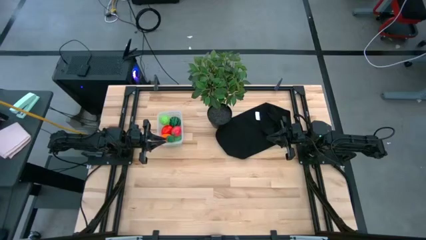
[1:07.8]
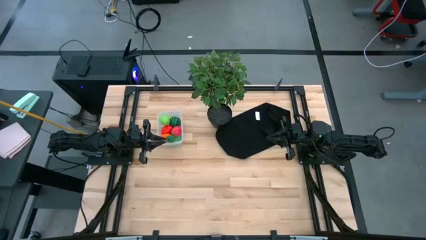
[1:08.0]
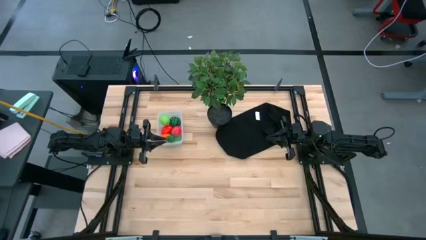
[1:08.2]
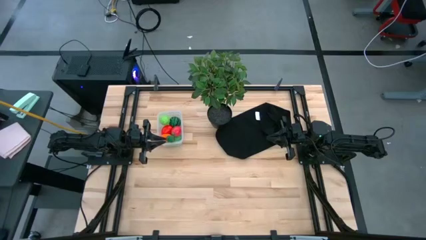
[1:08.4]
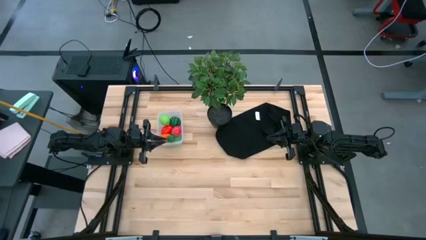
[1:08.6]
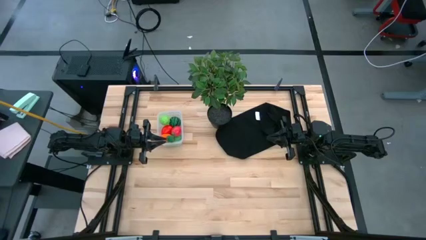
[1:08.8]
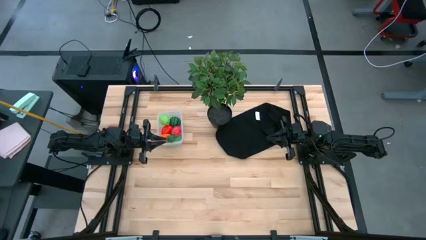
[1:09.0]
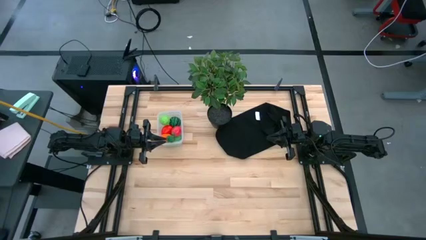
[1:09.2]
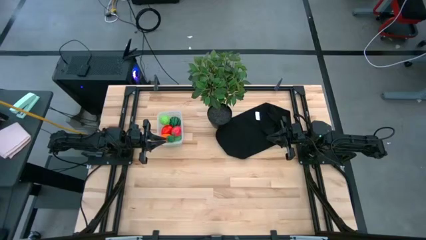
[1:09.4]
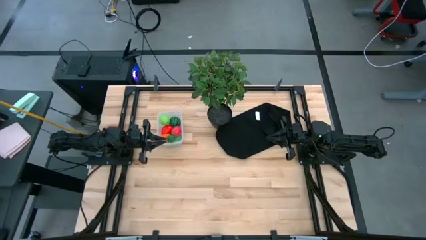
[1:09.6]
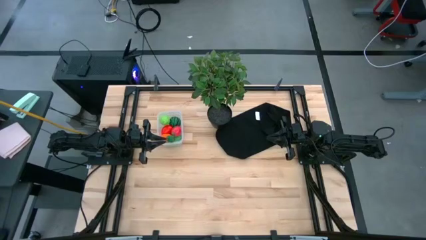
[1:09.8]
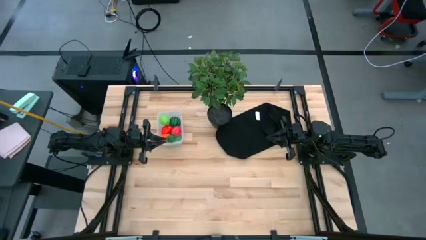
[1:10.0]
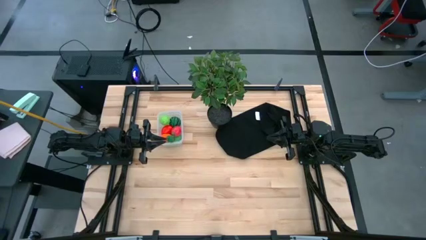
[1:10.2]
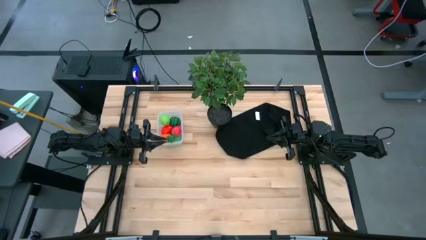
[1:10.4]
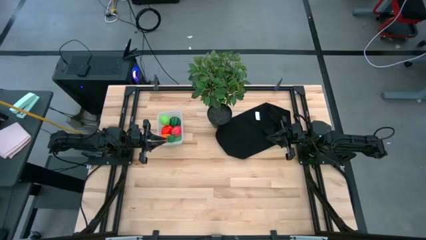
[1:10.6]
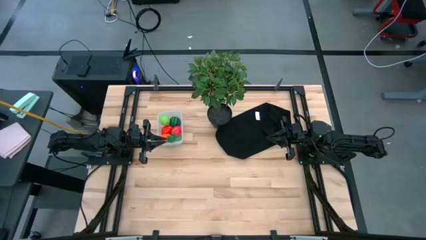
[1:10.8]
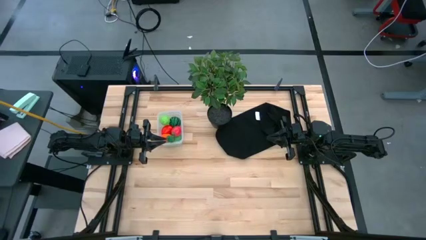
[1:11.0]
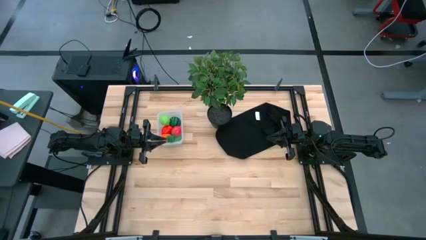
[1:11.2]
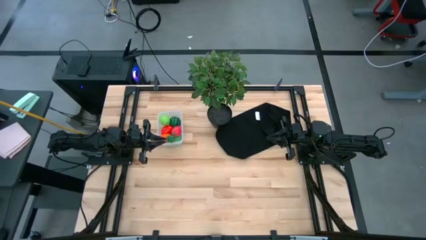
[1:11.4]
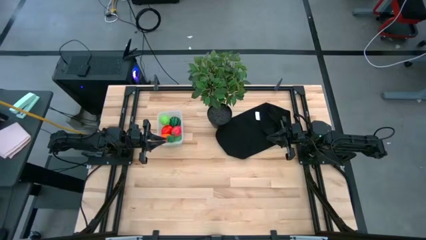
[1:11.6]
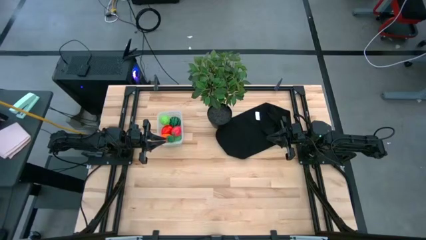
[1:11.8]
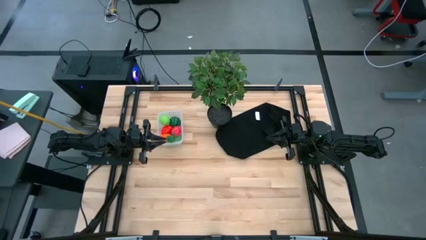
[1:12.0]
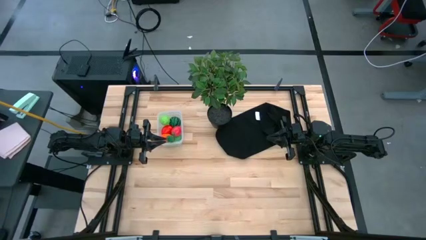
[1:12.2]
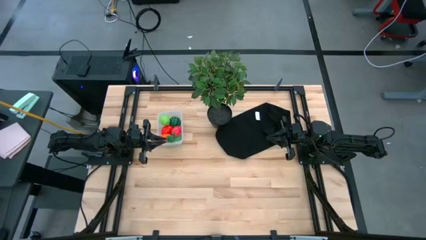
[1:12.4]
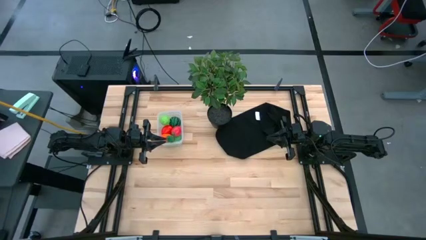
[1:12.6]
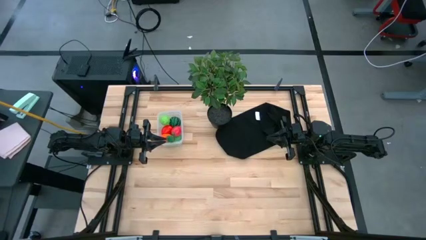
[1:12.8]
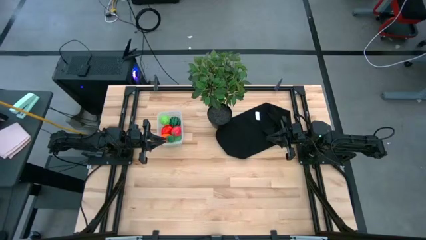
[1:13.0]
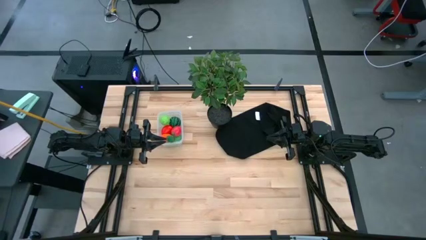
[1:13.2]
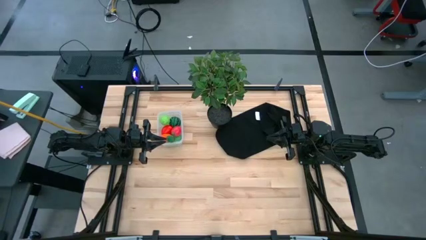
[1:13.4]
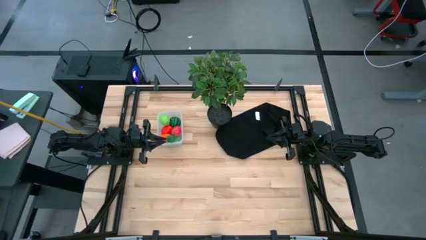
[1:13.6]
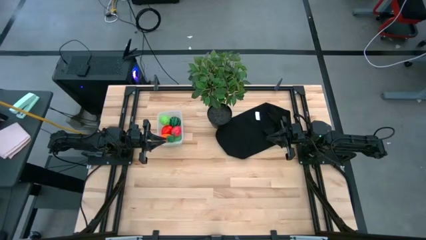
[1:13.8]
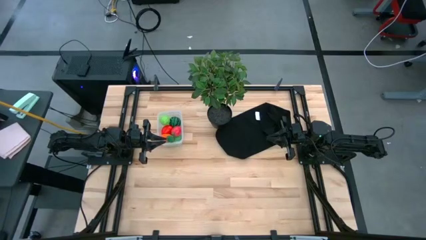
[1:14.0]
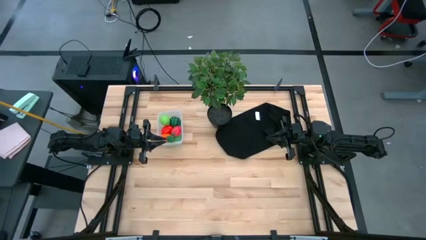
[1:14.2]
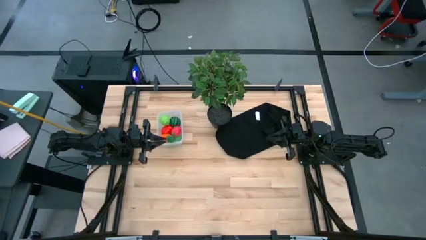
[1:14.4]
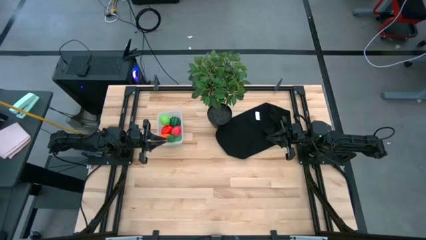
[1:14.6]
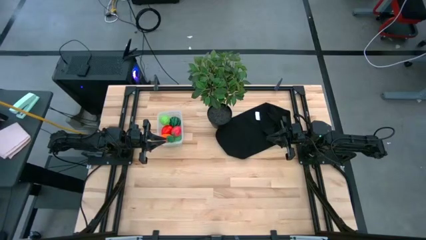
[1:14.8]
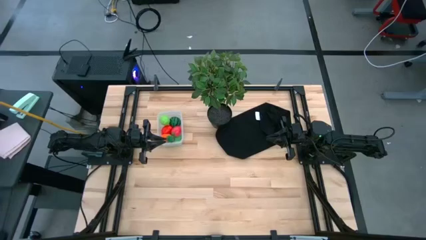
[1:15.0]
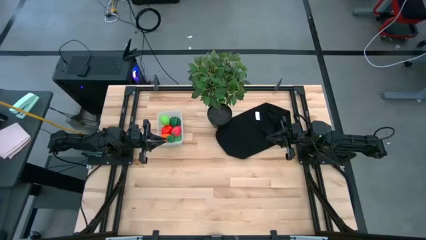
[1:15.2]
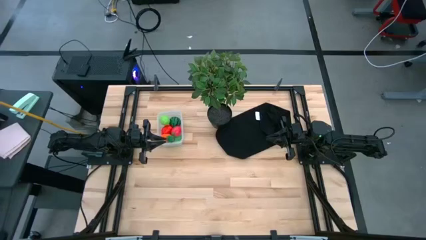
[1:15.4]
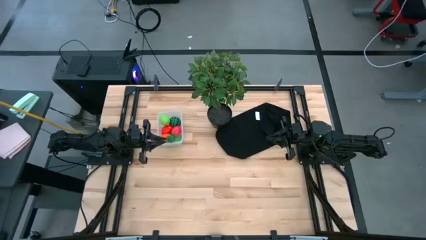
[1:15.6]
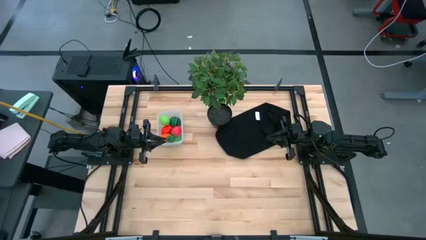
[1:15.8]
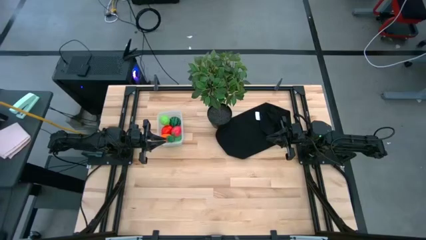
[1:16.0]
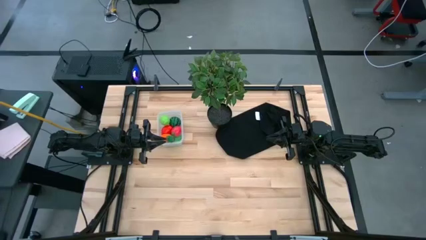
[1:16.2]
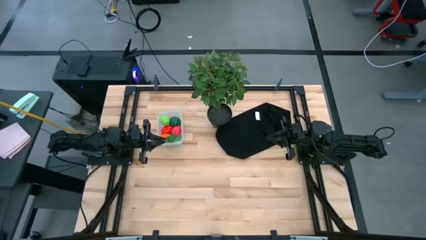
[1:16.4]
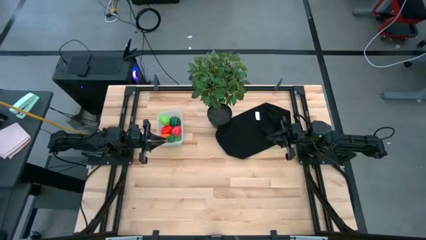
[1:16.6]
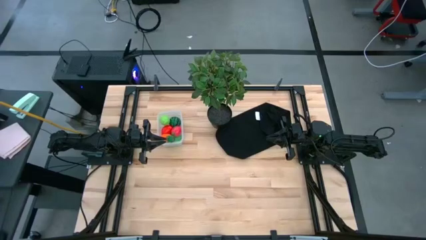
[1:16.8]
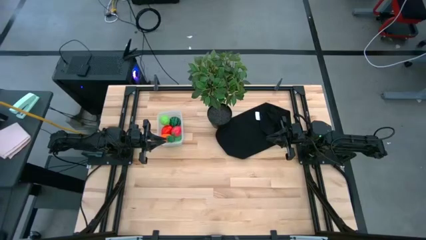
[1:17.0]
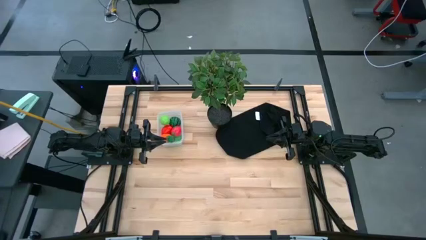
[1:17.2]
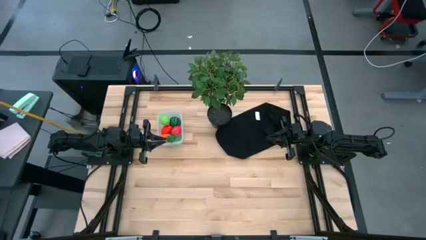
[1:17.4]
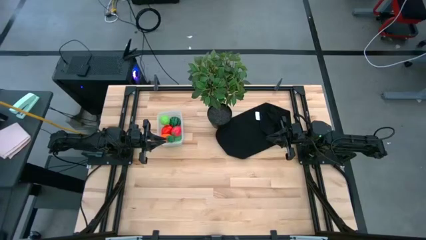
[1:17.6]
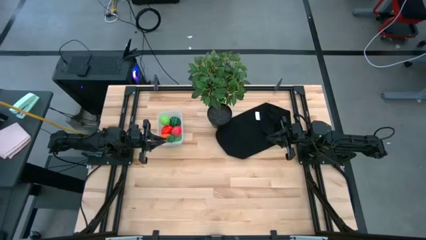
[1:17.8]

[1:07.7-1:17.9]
Task: Pick and placing Produce into tupperware
Return to Home Position

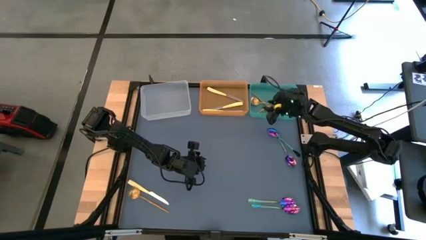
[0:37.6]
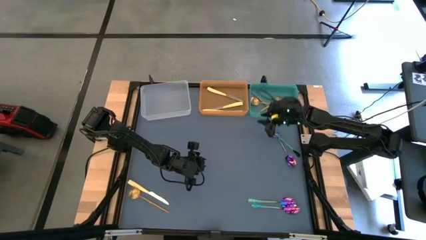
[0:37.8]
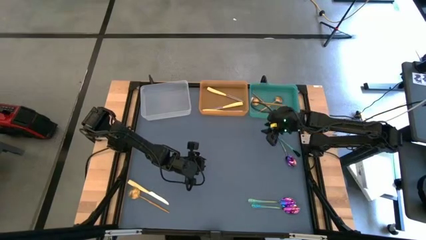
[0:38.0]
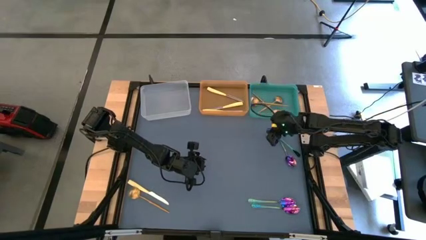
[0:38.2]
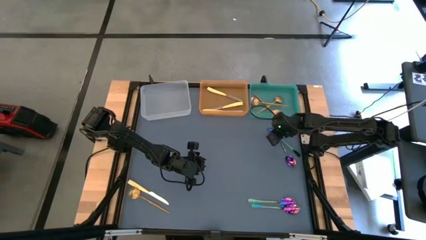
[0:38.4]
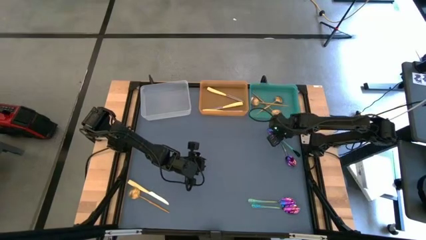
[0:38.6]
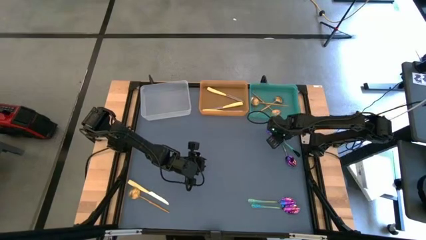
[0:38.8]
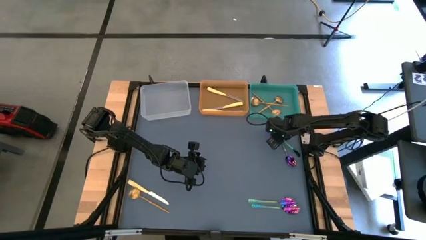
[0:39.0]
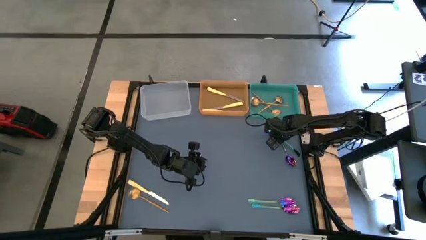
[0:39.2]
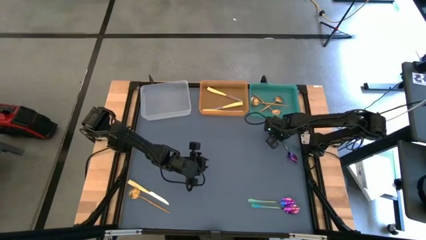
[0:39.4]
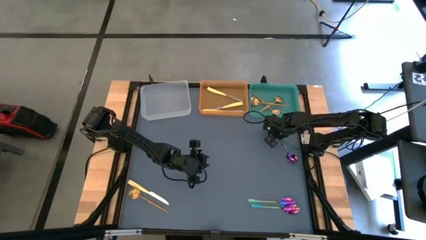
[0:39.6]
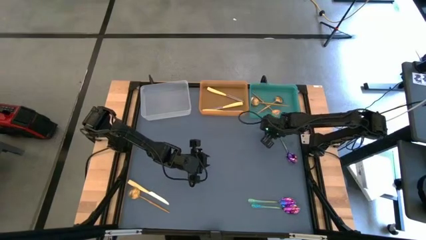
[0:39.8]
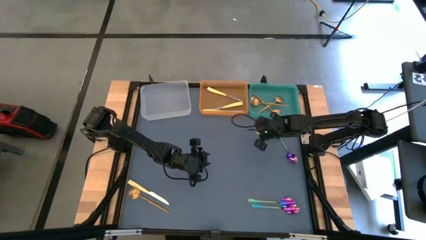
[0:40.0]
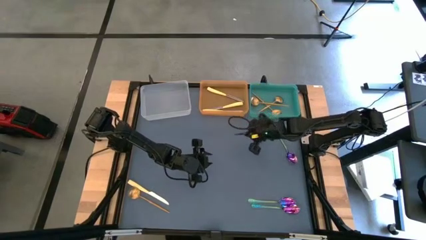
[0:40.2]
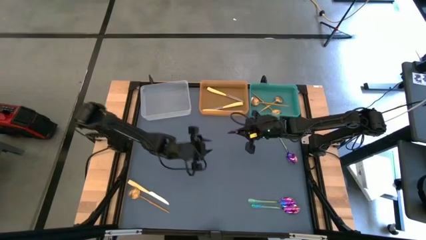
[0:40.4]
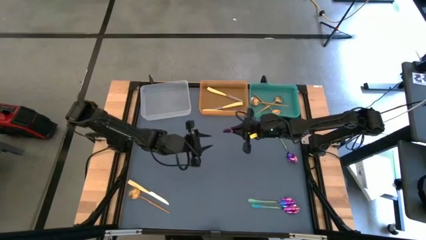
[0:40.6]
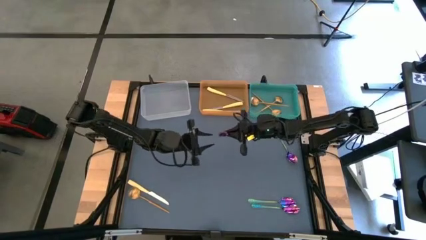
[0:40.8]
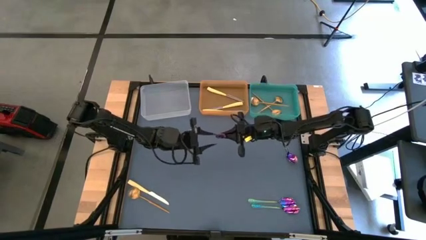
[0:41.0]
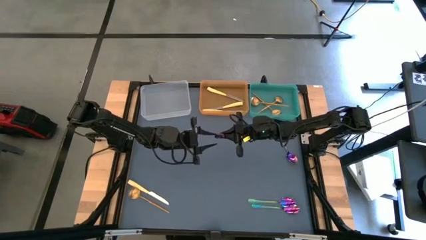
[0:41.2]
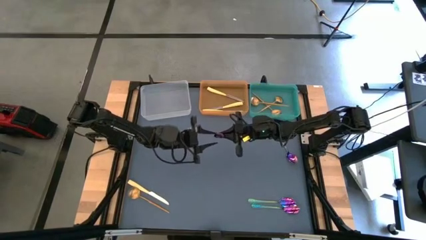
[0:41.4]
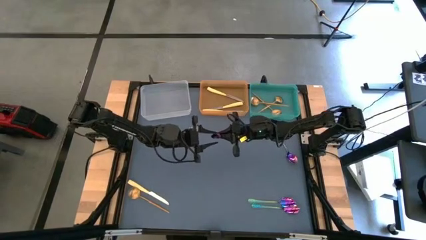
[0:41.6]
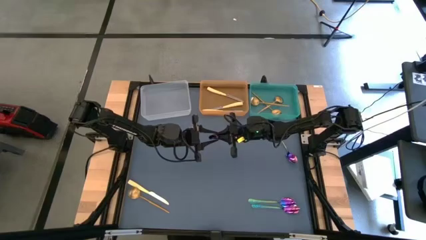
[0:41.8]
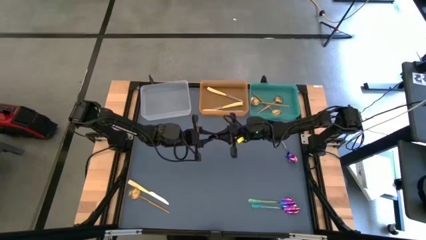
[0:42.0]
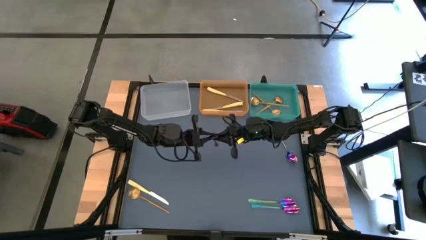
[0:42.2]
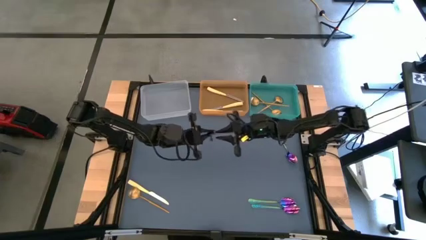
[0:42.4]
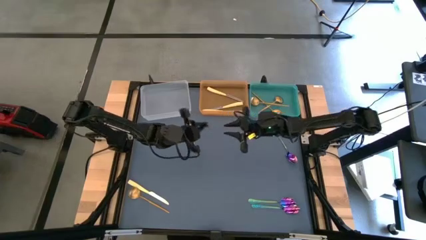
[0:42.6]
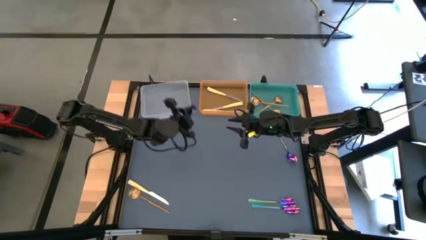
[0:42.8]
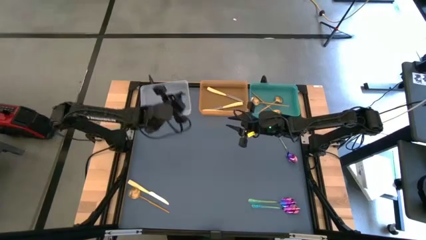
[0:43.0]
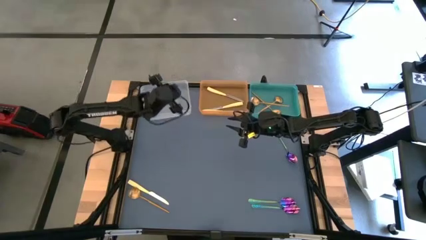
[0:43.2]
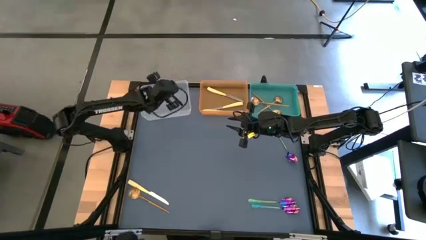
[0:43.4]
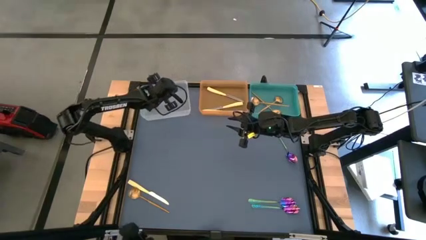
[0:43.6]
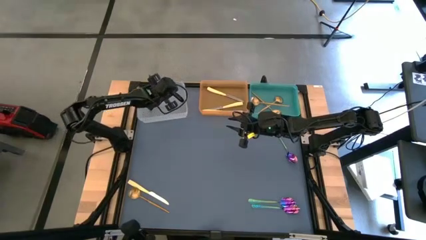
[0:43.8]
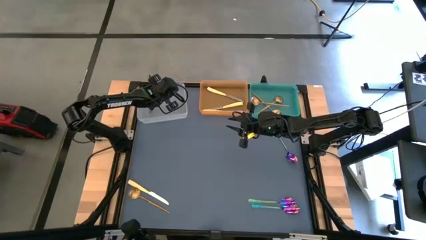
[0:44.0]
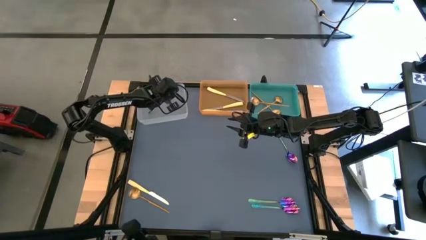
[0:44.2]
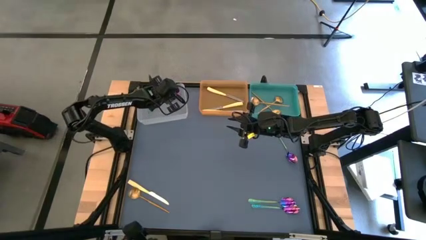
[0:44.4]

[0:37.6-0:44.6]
Task: Sort silverware by color (type)
Put the iridescent blue spoon into the transparent bin
